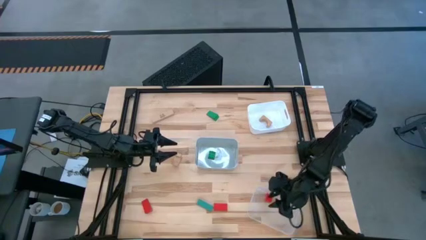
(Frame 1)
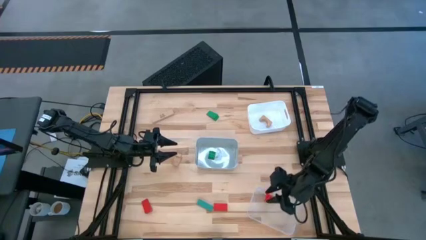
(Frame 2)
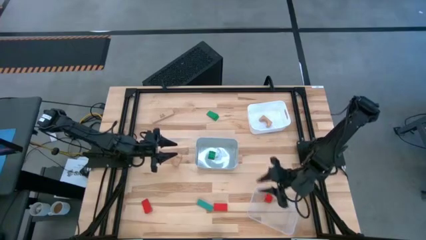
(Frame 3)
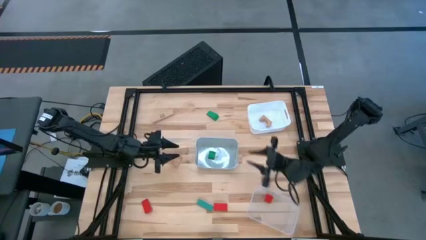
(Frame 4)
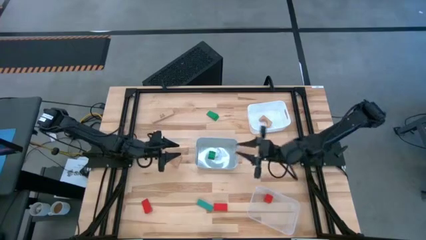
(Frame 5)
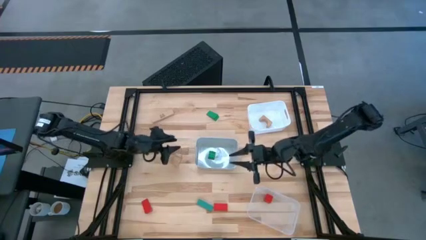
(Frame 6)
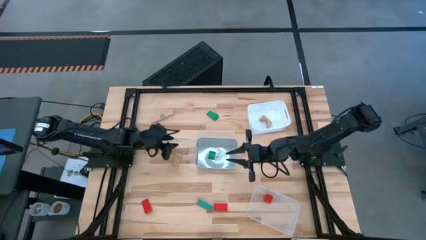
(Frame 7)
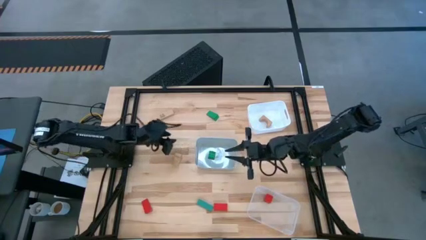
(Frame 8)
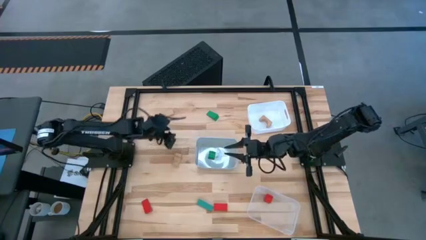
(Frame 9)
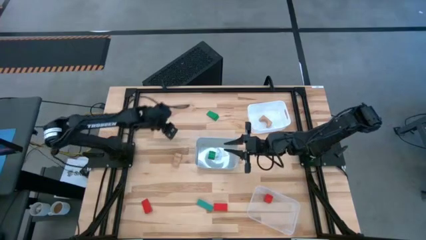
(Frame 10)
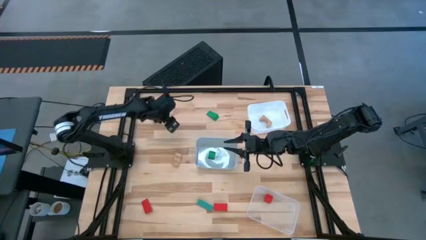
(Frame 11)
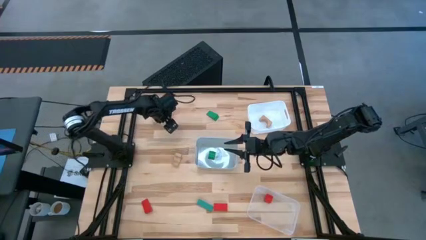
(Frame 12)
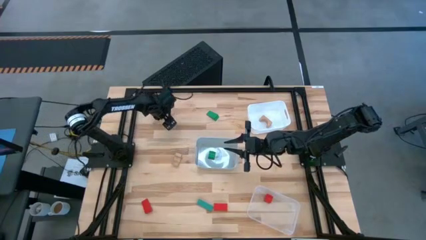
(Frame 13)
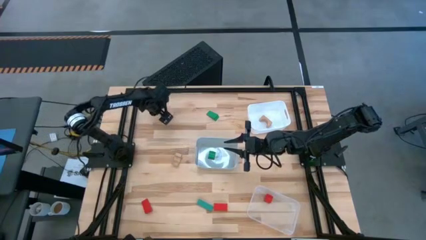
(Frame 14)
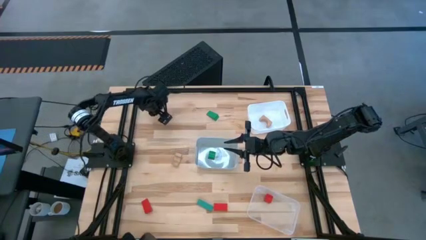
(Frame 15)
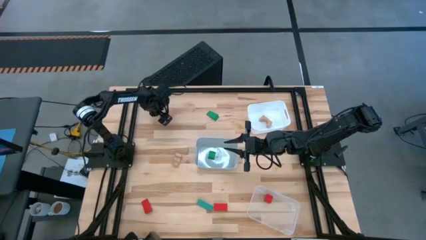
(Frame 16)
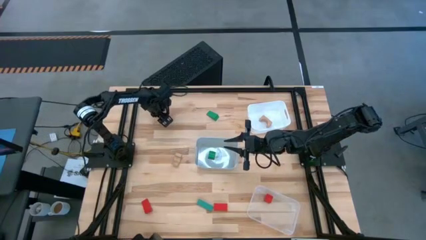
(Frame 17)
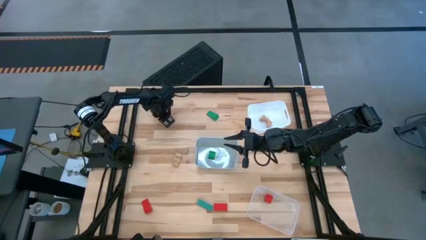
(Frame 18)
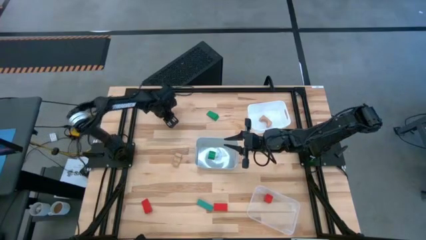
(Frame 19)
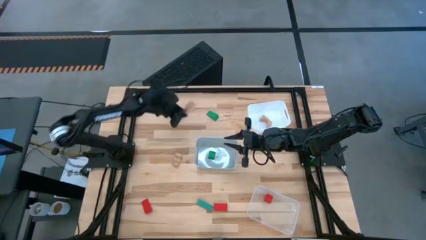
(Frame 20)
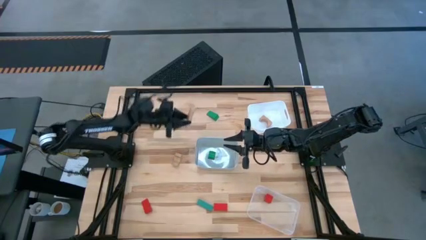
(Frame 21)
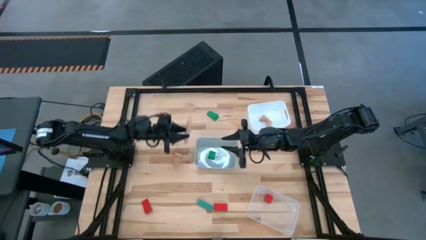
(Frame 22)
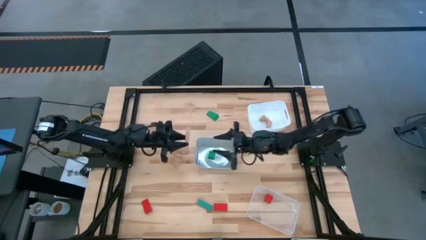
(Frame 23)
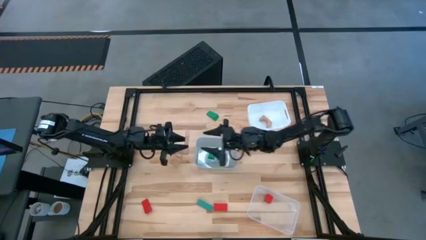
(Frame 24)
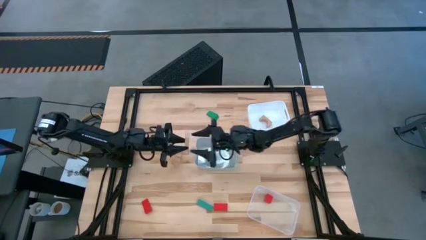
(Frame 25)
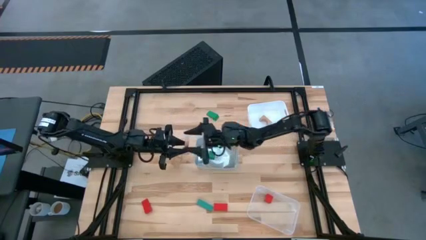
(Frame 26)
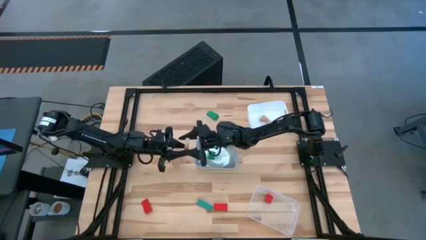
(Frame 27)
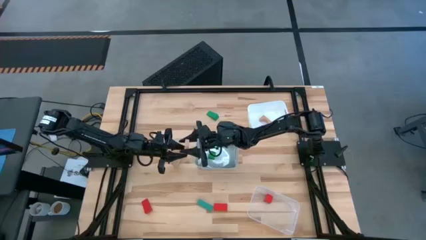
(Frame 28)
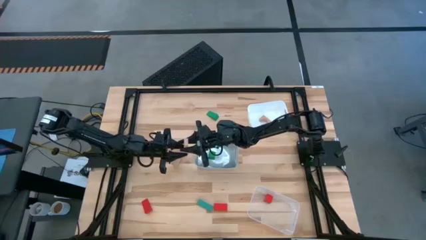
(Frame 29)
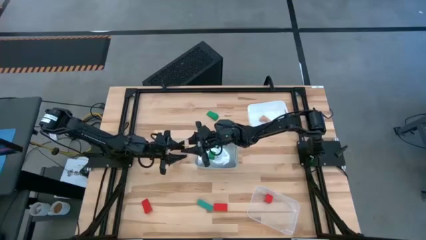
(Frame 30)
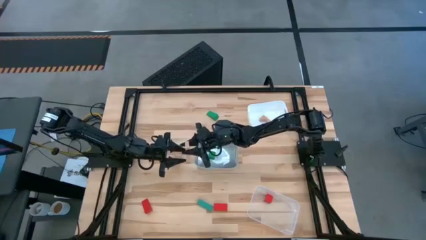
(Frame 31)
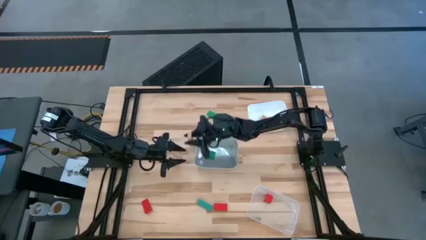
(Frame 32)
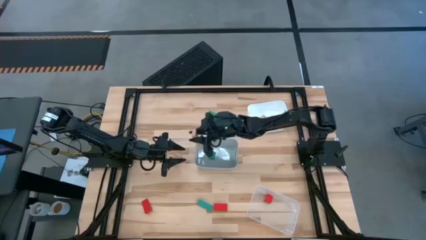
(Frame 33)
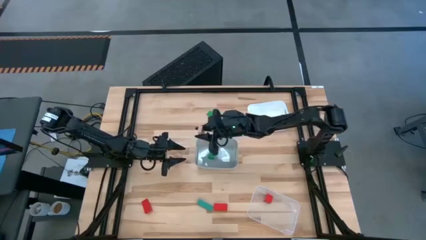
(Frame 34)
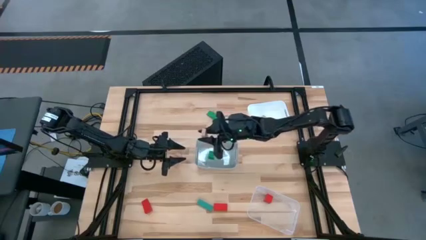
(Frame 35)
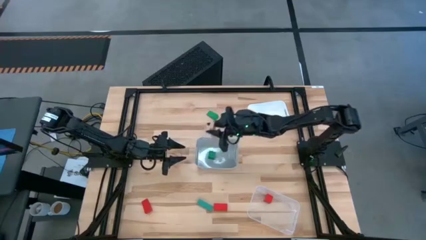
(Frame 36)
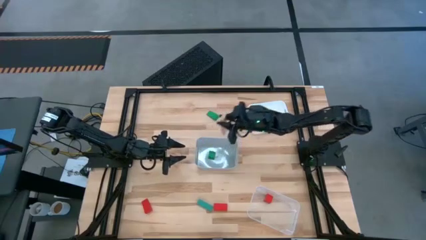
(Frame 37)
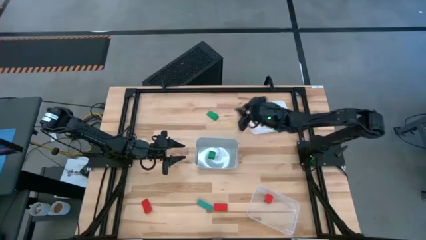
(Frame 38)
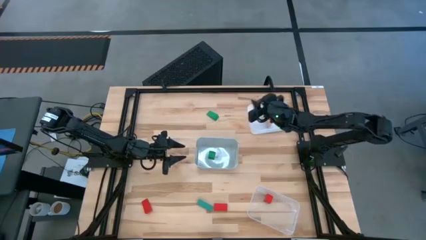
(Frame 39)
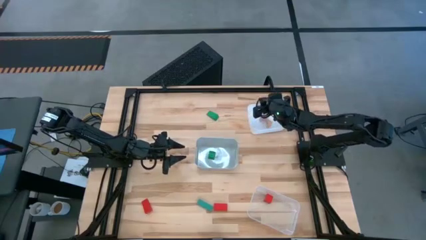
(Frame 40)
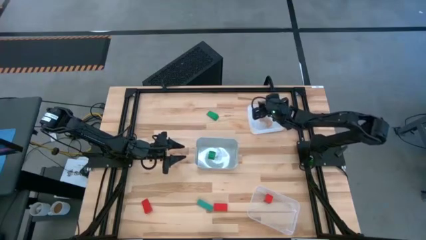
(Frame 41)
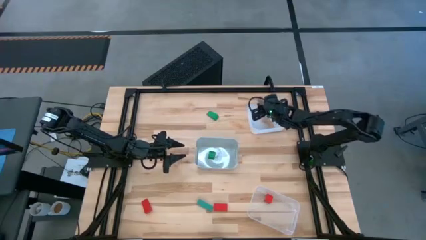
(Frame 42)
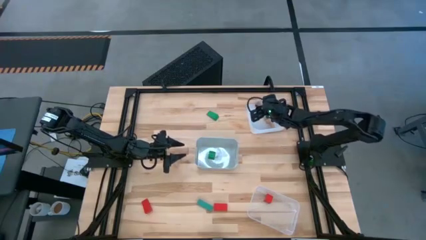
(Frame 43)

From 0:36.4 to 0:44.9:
Task: Sort & place blocks by color
Put the top brown block into the white bin

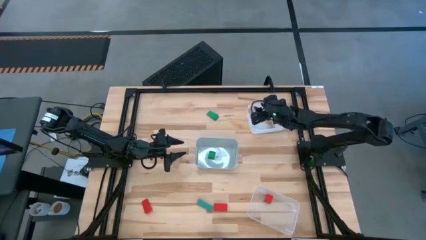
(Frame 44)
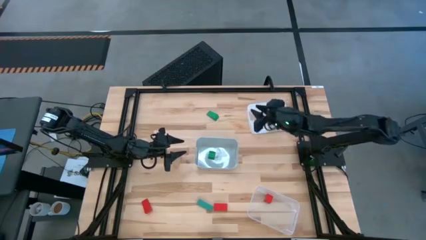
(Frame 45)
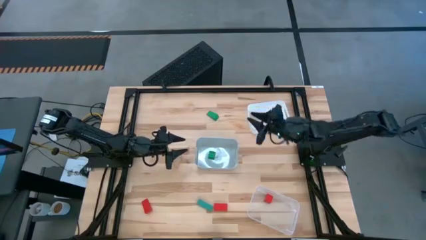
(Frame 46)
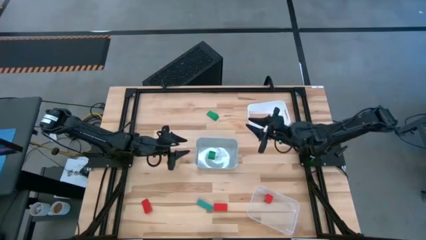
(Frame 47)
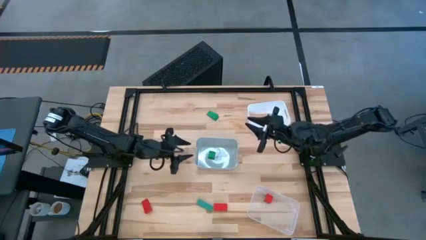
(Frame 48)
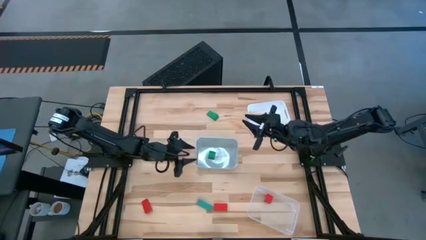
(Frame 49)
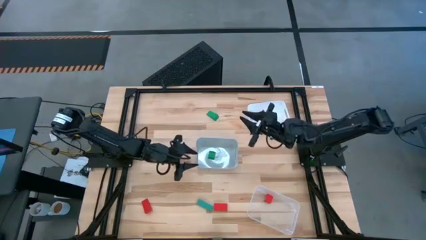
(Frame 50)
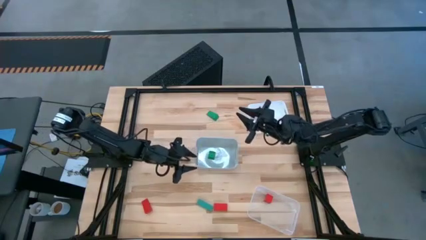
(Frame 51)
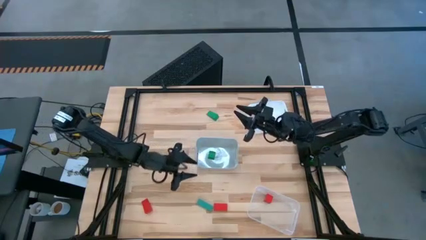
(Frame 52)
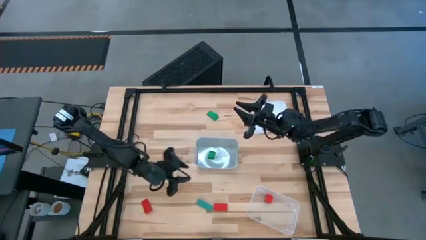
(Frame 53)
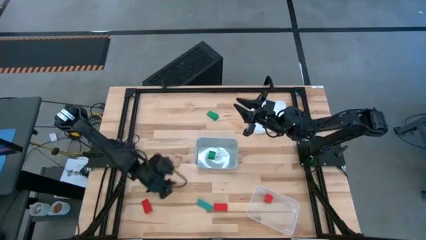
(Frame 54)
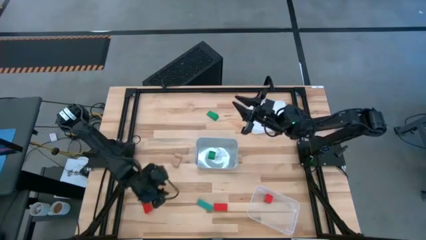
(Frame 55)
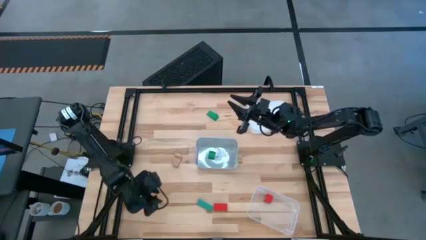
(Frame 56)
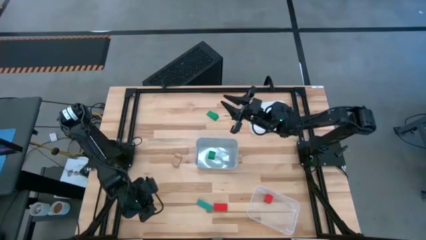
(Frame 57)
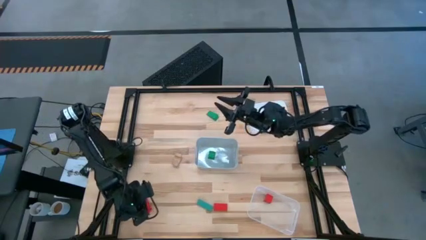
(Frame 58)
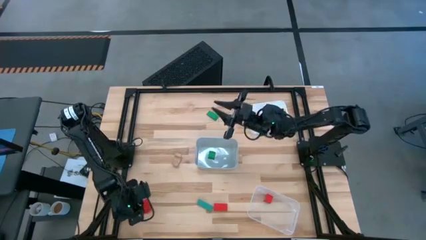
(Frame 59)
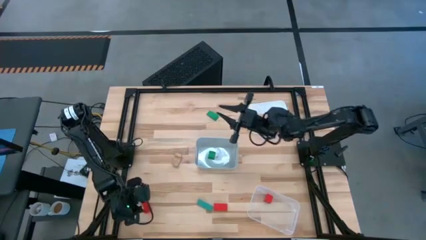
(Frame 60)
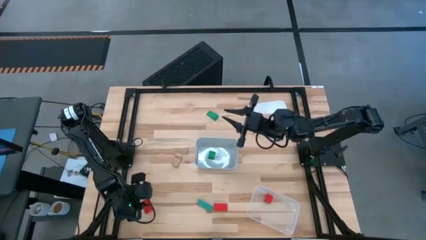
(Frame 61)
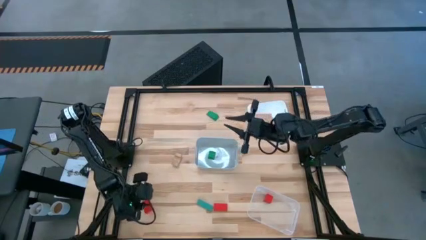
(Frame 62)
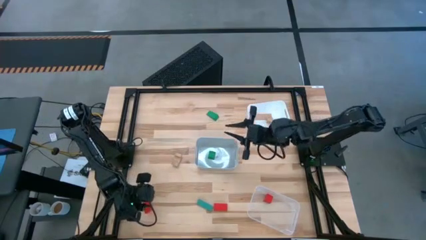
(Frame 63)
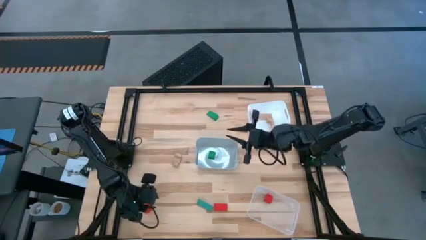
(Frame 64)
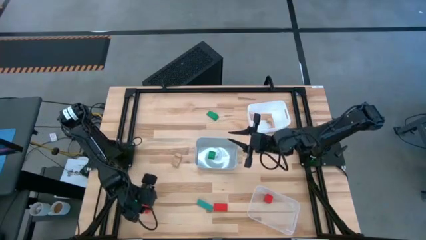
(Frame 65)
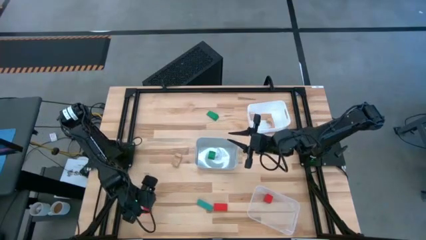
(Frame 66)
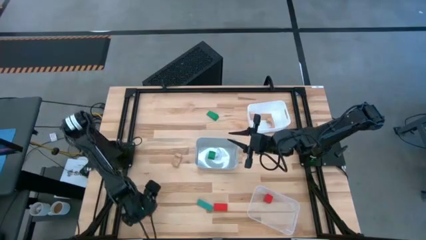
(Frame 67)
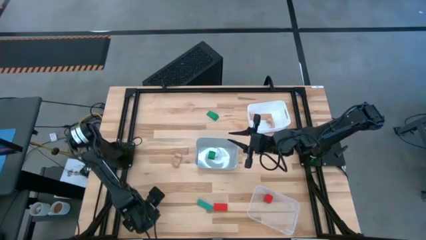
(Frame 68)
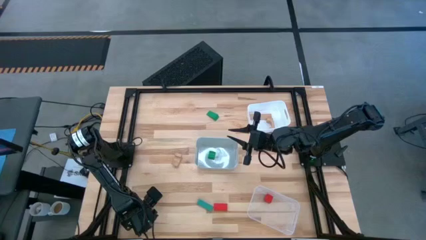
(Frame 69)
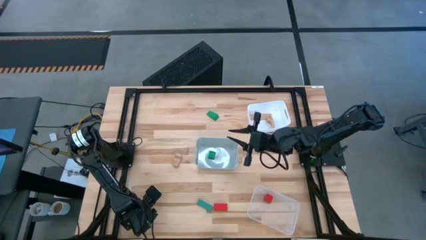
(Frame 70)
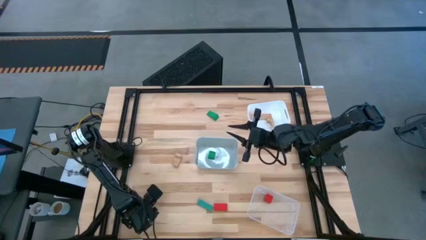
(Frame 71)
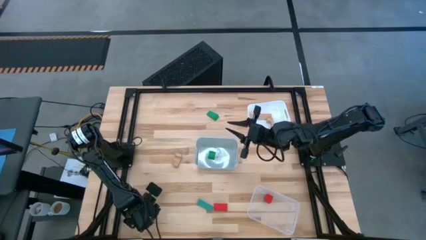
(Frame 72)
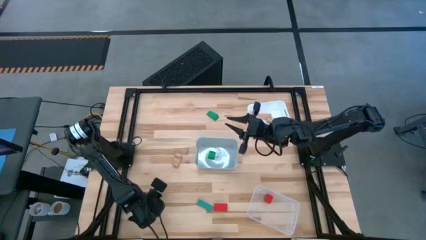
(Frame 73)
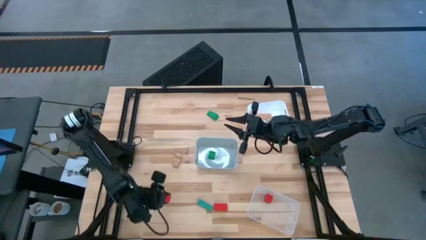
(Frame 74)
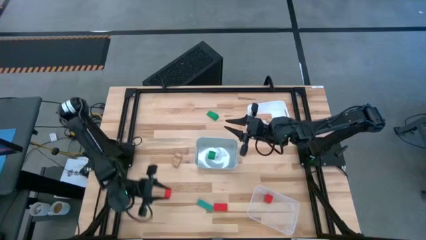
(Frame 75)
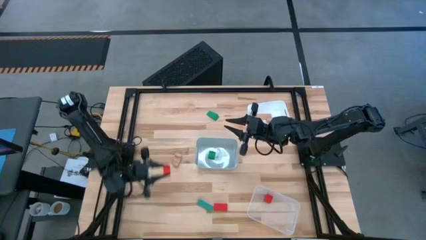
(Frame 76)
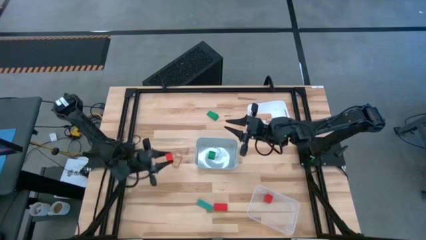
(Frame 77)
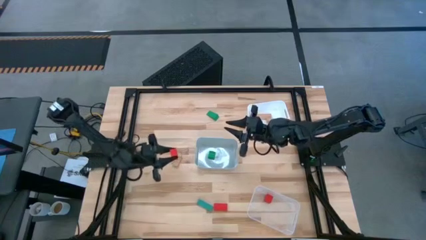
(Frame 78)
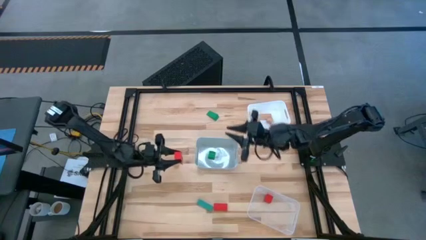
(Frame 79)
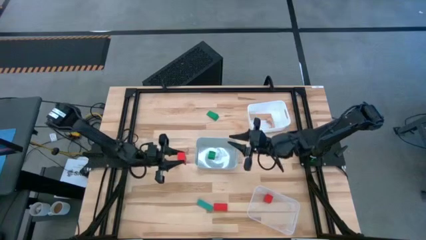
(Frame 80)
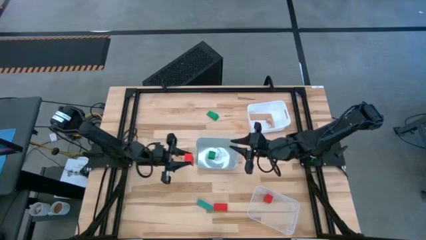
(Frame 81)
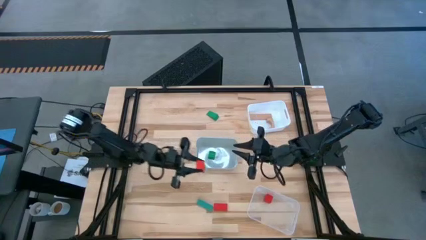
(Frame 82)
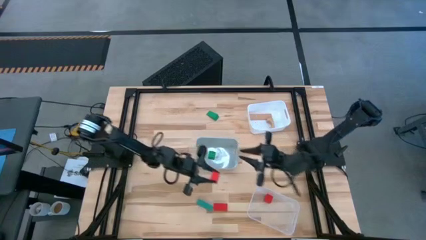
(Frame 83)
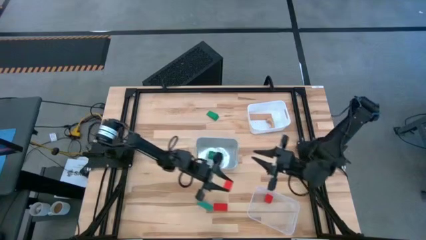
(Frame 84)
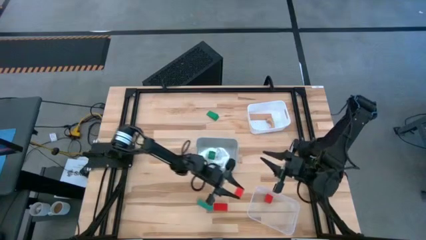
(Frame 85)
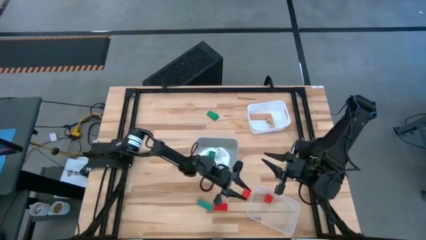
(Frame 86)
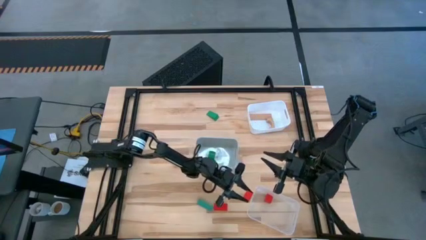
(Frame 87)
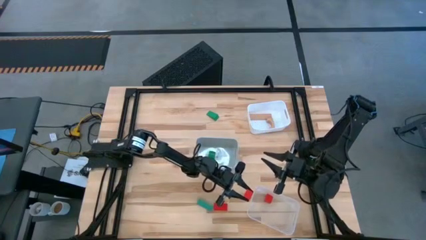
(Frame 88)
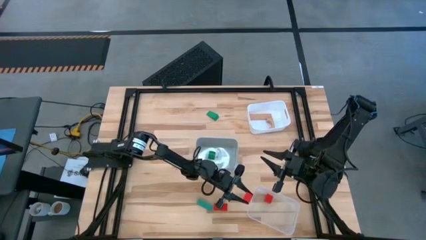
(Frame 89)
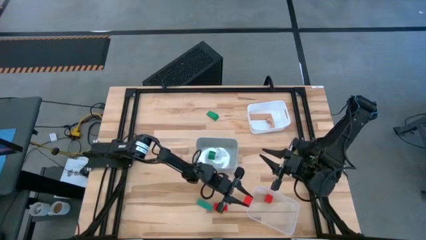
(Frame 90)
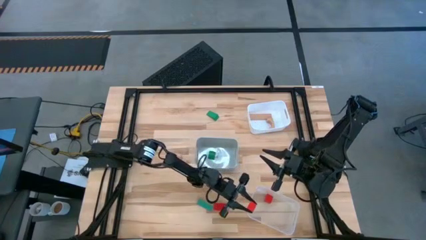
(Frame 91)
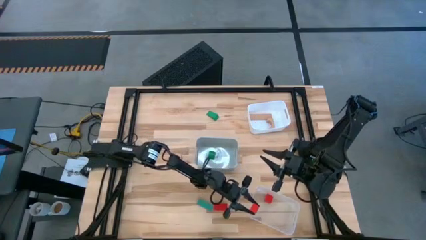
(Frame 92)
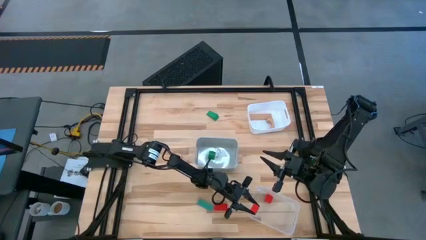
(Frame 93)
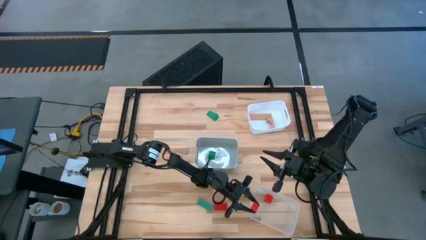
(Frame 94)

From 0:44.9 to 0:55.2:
Put the left red block into the transparent bin
